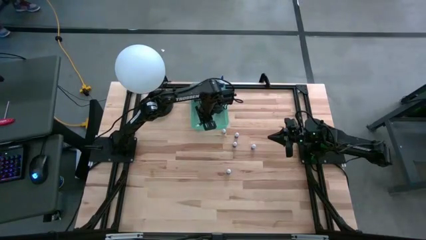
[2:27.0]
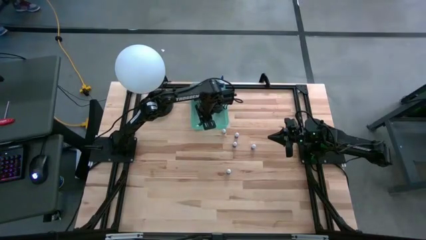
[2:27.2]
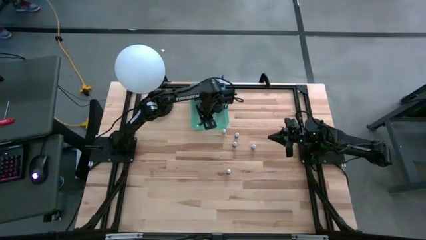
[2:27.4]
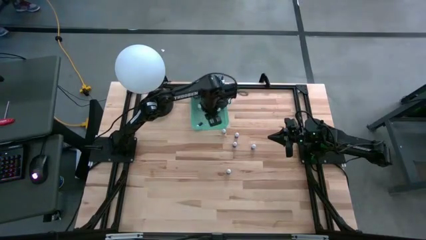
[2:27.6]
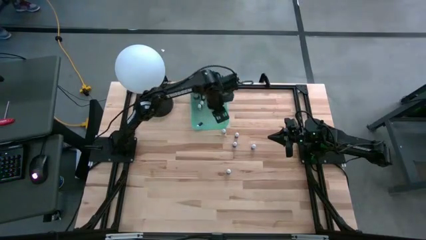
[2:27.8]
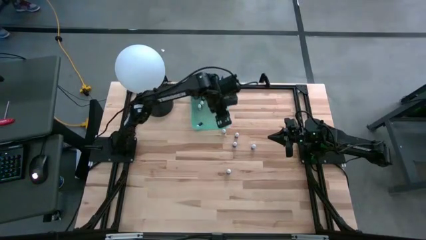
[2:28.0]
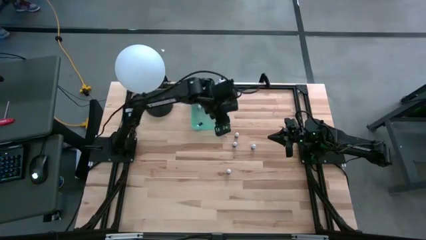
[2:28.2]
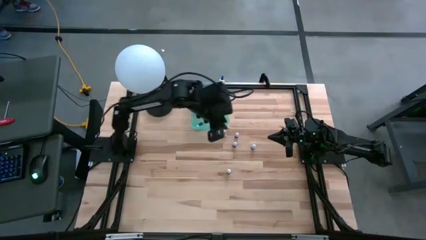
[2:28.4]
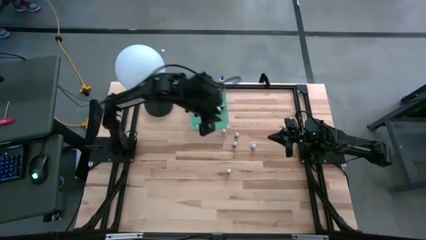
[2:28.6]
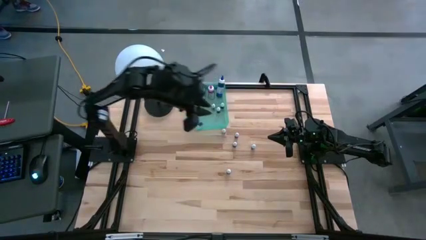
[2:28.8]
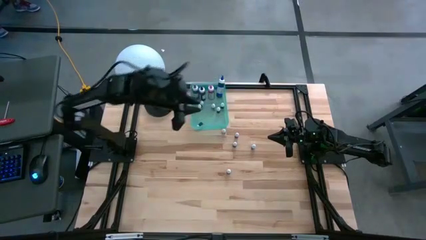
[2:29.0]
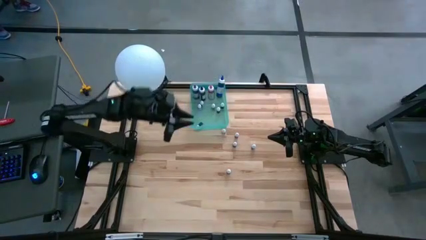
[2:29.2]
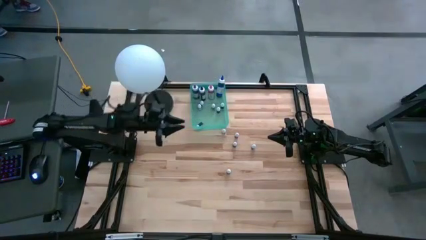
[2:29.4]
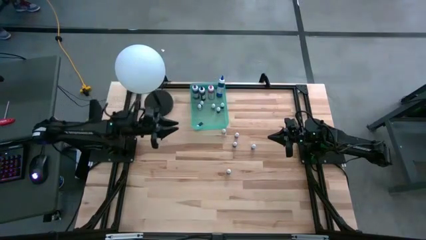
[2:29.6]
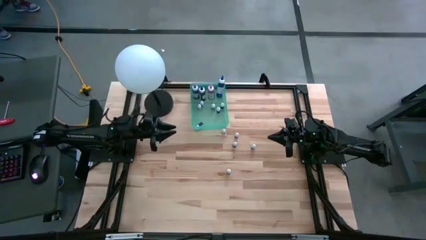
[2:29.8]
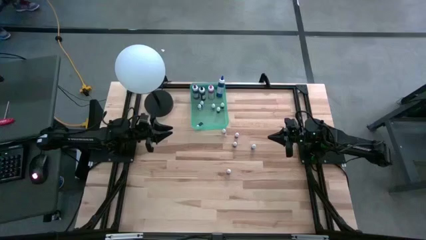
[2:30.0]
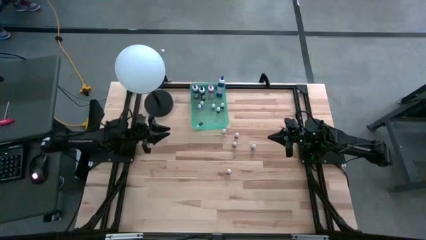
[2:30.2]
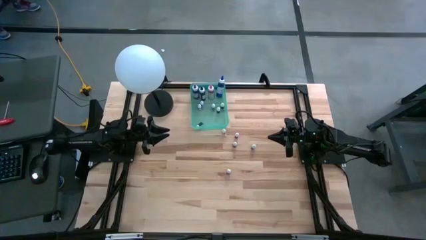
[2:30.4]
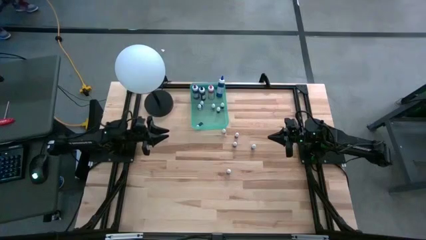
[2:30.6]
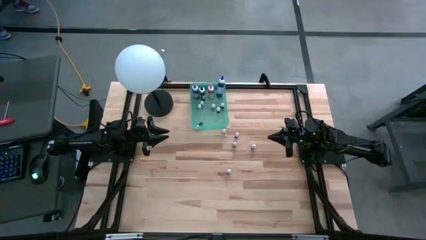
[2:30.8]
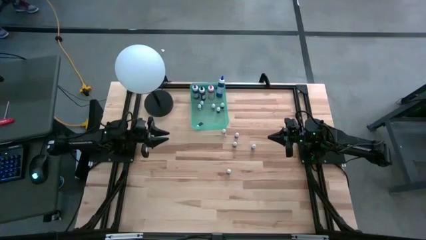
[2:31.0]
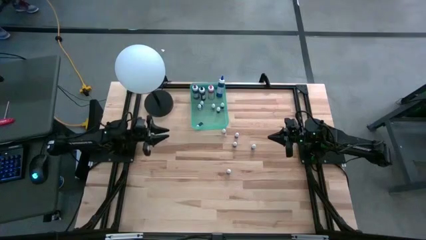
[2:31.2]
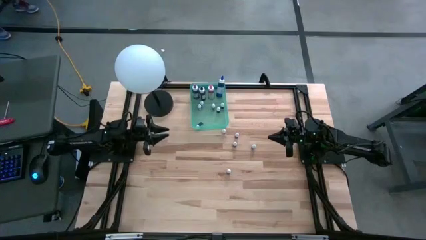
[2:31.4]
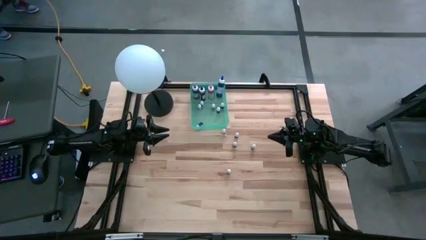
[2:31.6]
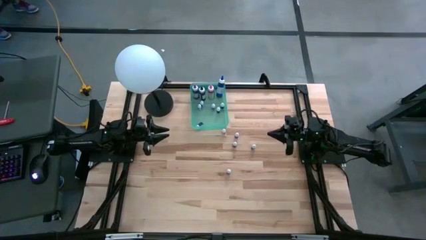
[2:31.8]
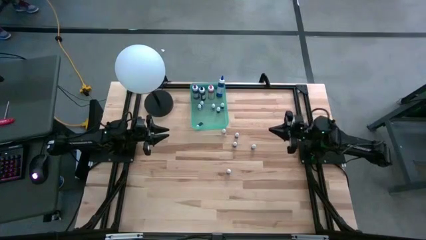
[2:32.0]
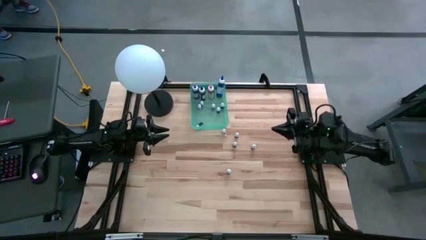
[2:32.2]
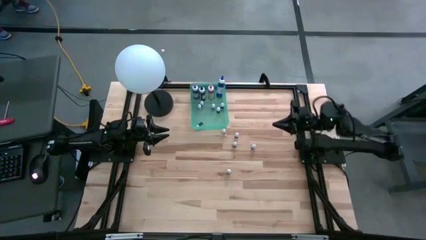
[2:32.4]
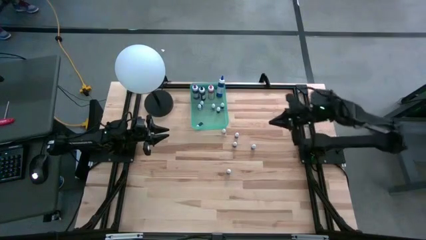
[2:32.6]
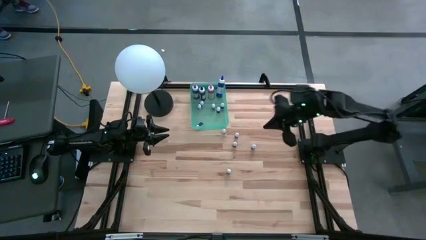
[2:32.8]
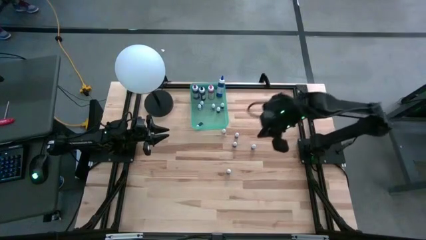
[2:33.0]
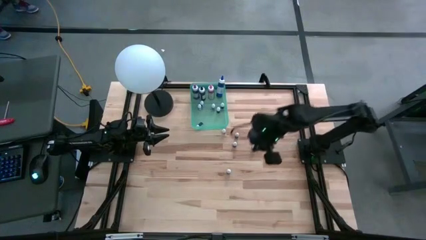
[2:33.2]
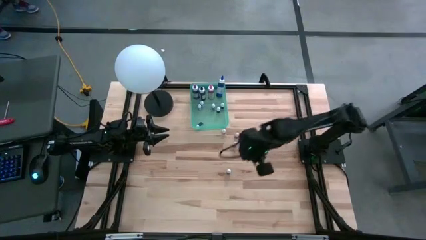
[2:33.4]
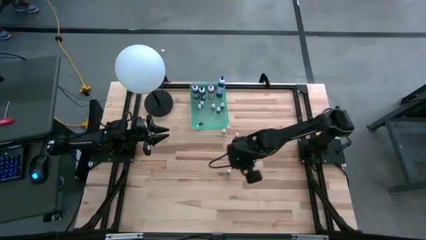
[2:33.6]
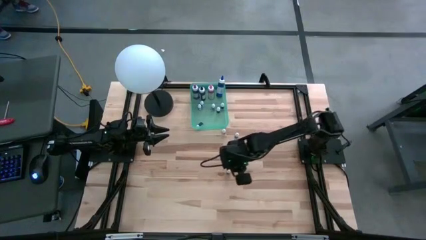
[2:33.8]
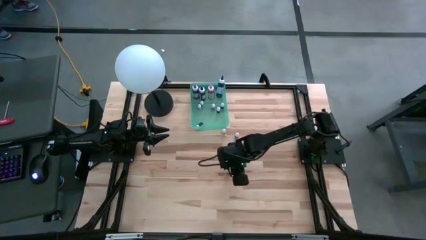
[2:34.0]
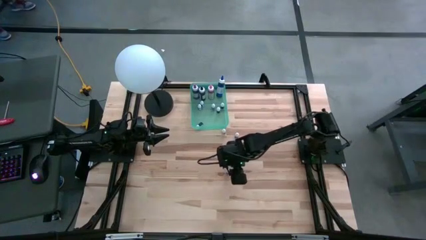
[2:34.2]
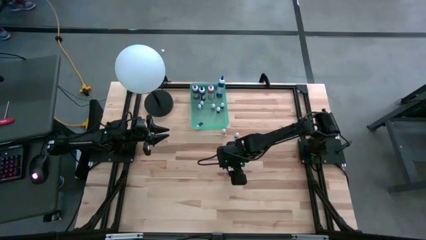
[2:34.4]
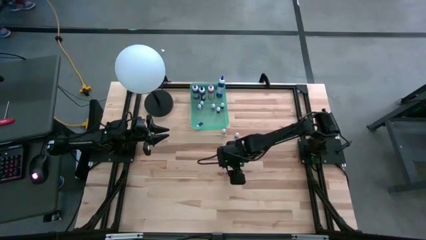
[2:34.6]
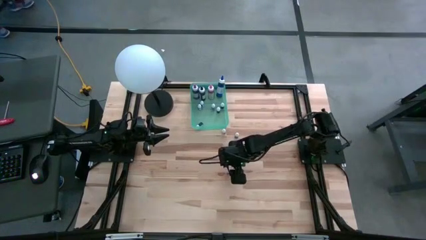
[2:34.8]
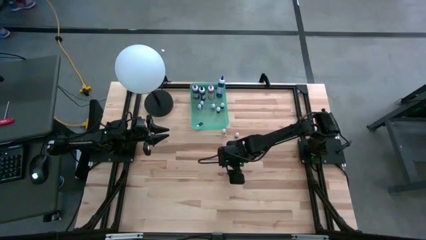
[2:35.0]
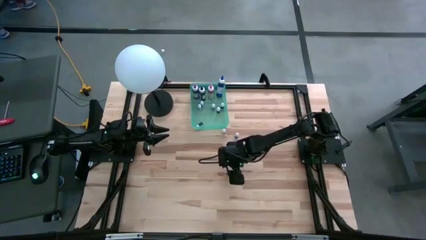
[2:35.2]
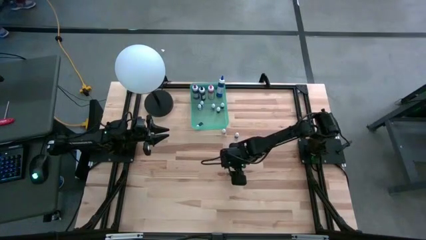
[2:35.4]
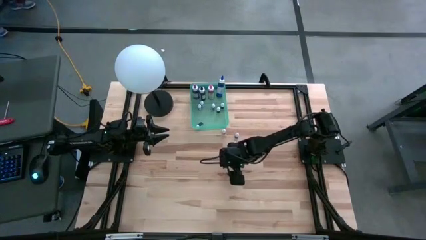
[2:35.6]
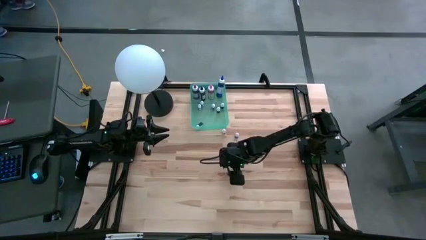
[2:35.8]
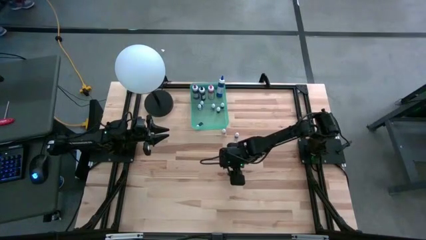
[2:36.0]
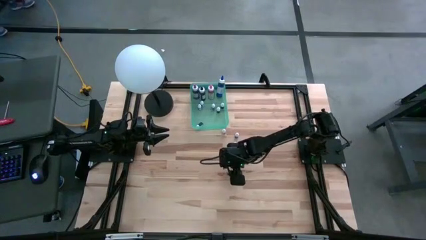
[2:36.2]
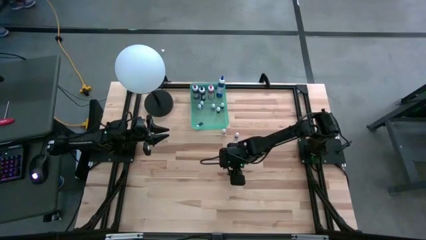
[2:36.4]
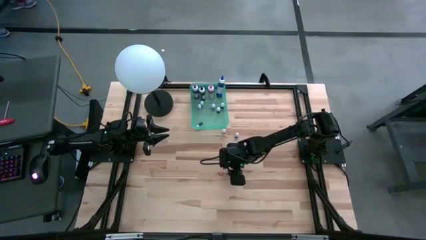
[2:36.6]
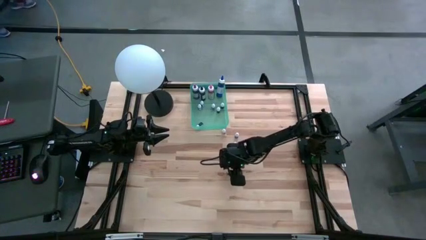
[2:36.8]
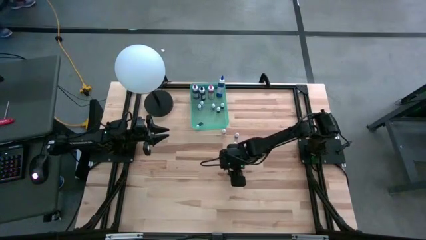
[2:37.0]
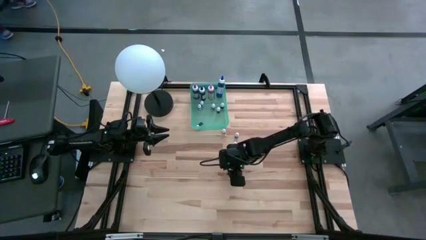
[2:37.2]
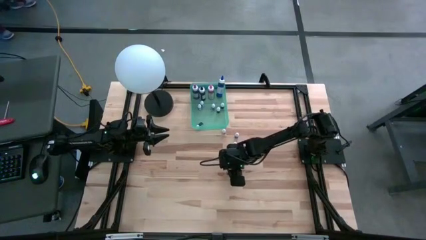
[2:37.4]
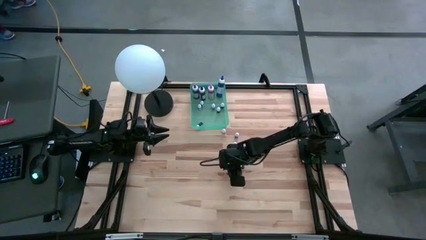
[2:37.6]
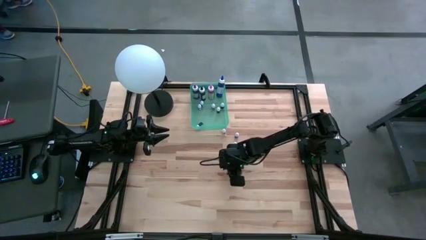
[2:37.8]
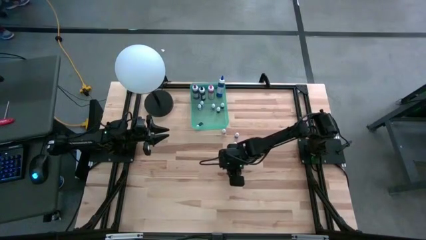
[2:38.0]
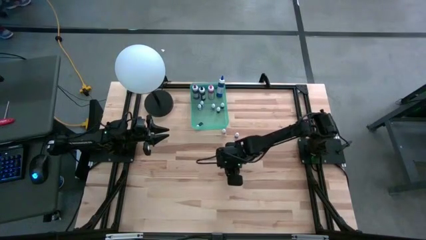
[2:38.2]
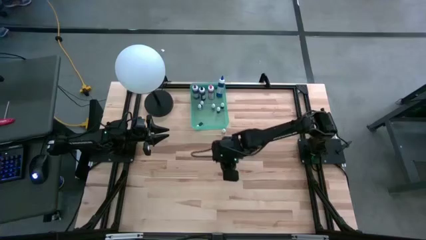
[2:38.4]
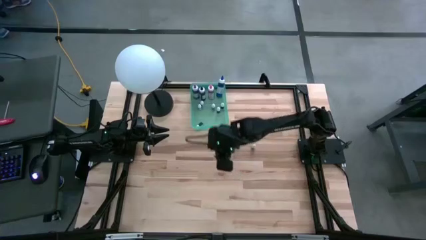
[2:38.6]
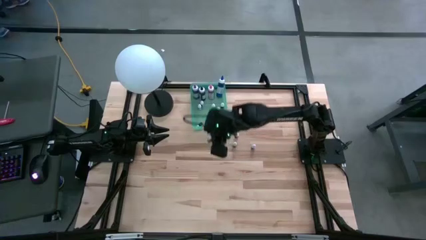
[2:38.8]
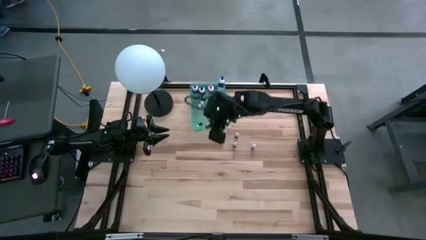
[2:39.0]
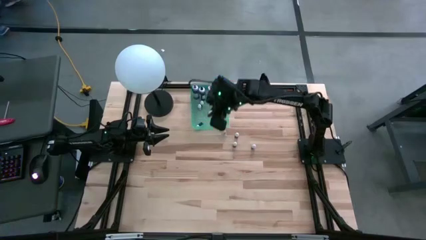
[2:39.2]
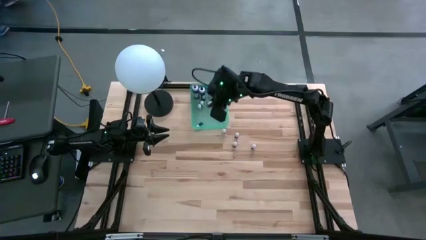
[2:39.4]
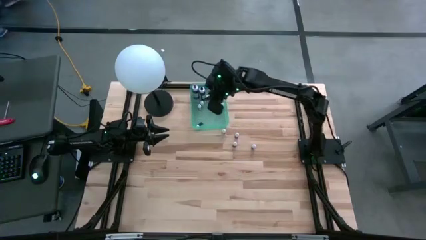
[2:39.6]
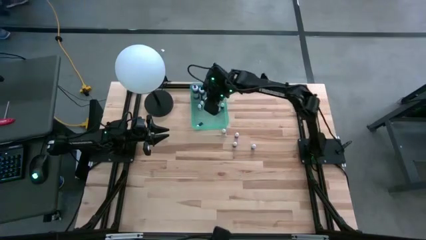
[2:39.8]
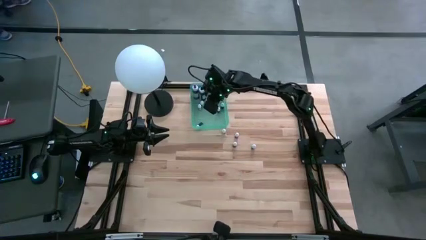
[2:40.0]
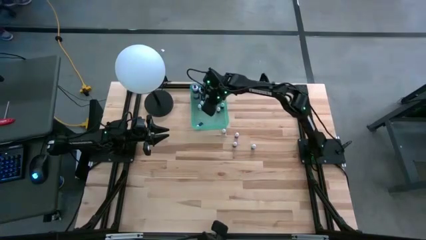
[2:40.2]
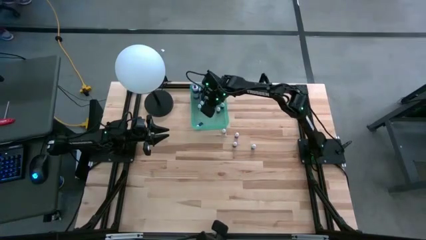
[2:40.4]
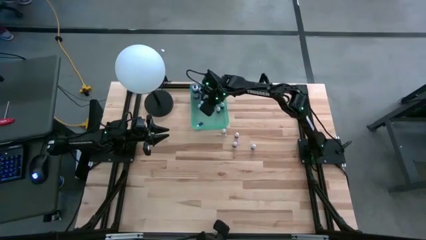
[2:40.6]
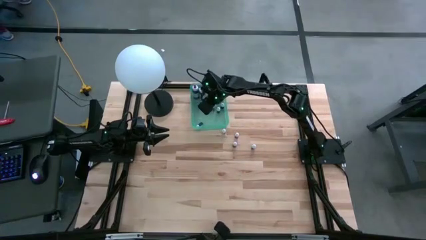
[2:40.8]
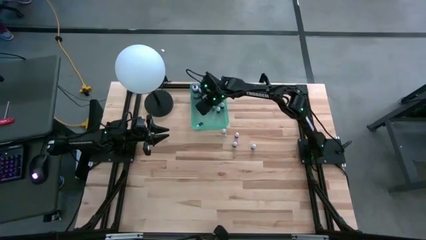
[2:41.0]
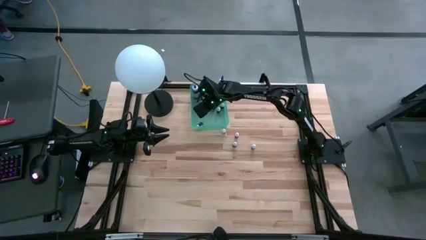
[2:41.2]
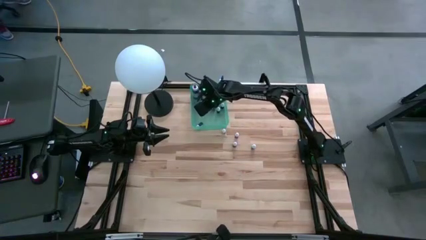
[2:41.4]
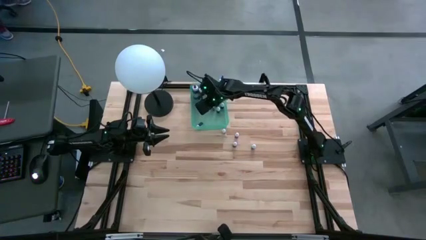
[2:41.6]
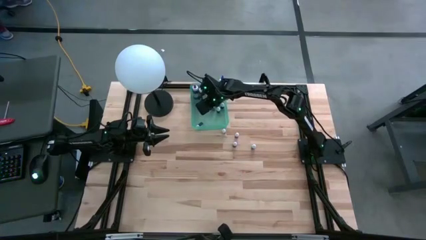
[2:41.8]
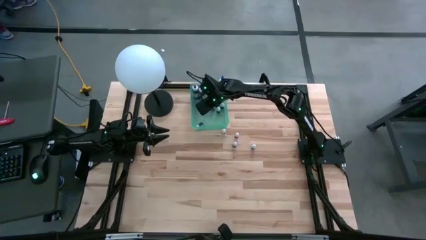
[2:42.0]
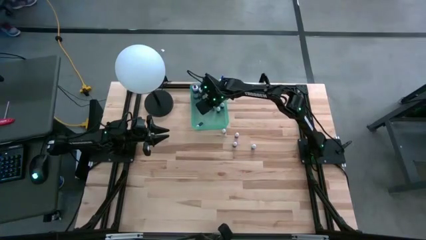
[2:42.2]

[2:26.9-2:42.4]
Task: Pick & Place food coloring
Put the small green food coloring bottle into the blue bin

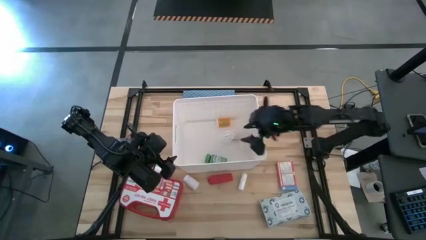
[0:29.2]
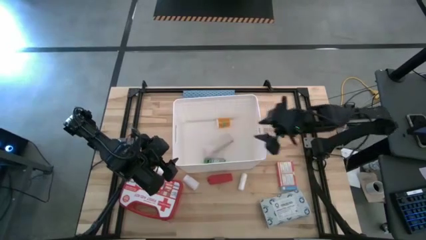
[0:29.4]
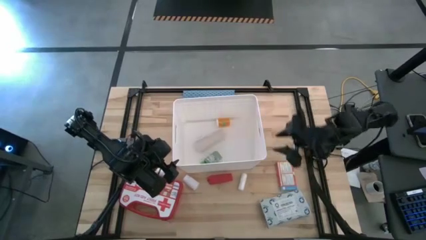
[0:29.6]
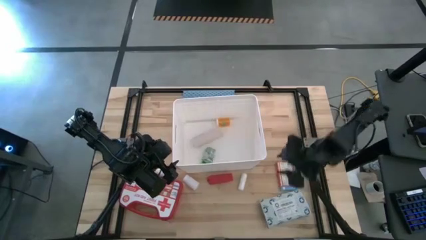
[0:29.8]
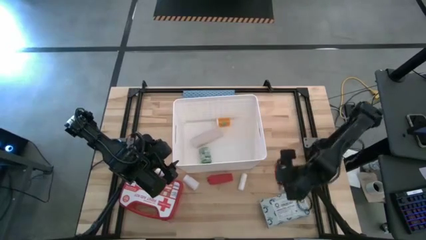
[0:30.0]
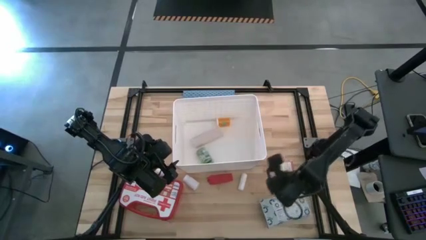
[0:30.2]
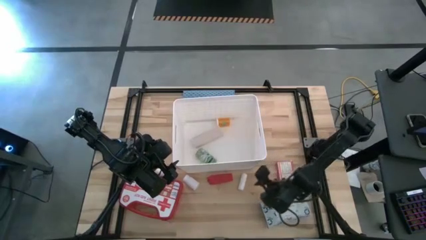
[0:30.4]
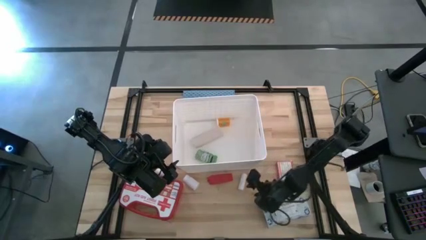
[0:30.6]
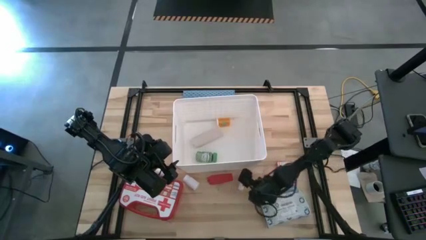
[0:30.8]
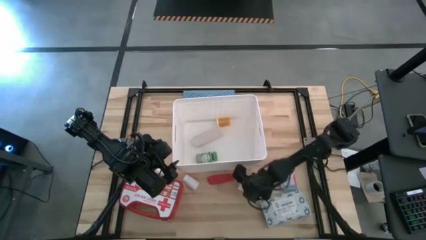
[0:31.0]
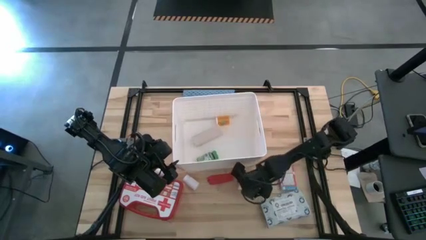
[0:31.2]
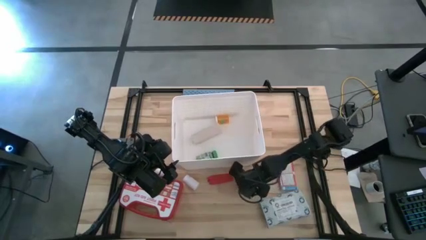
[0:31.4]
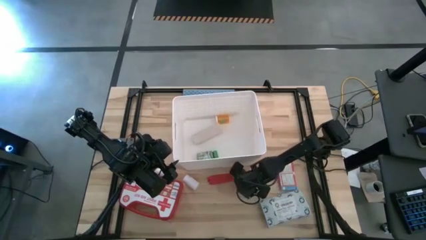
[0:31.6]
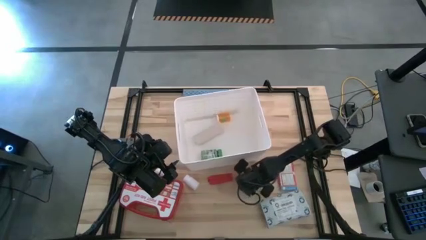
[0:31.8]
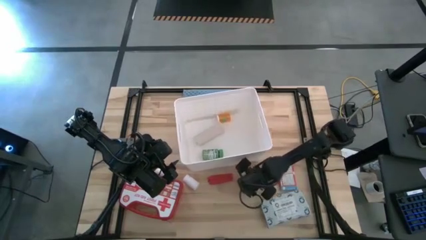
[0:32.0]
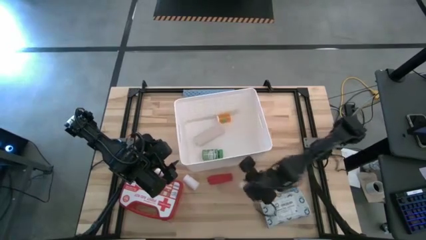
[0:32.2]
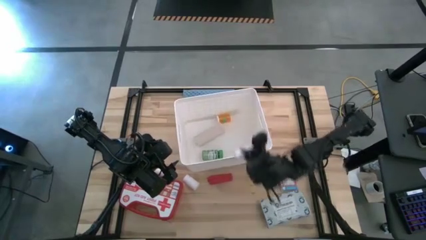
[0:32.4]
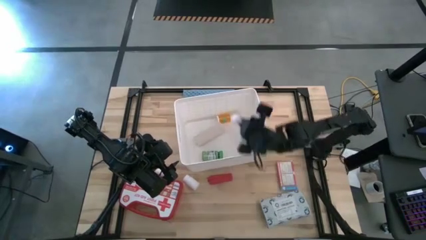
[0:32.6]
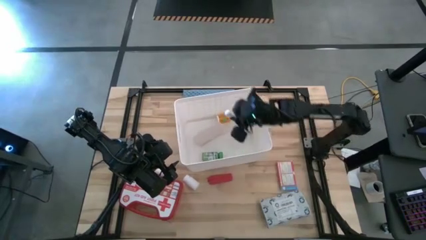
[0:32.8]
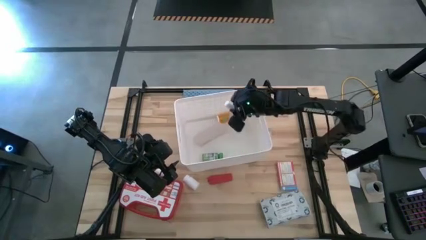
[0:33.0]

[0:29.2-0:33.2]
Task: Pick & place medical supplies in basket/bin
Put the white gauze into the white basket
